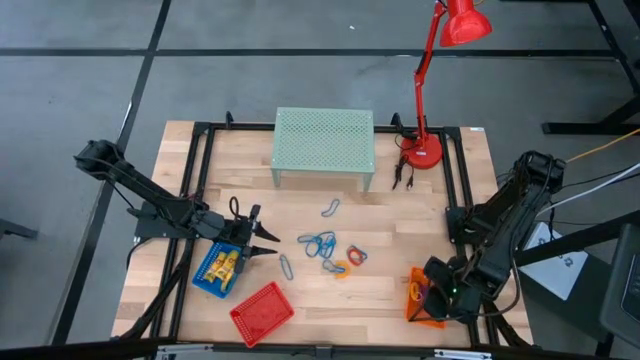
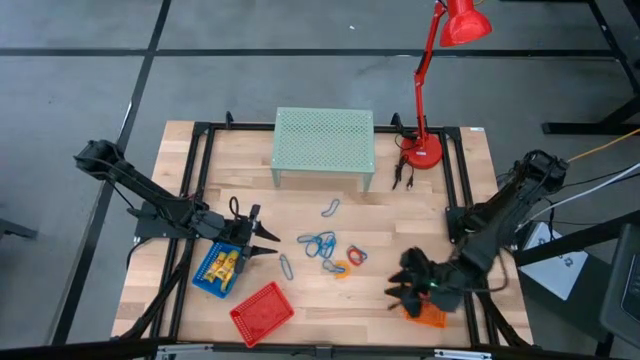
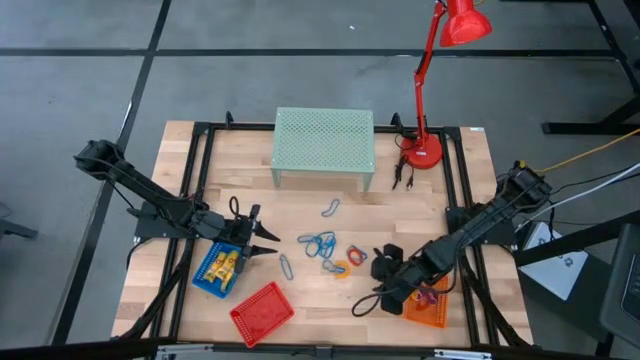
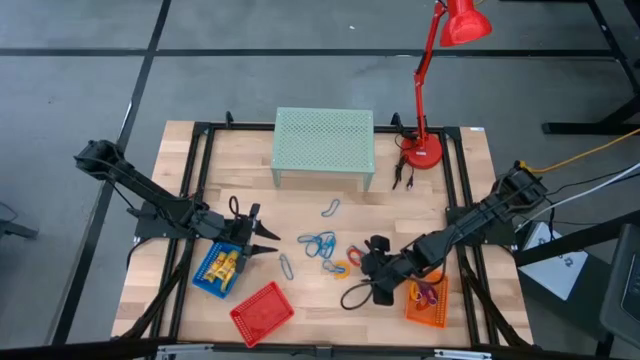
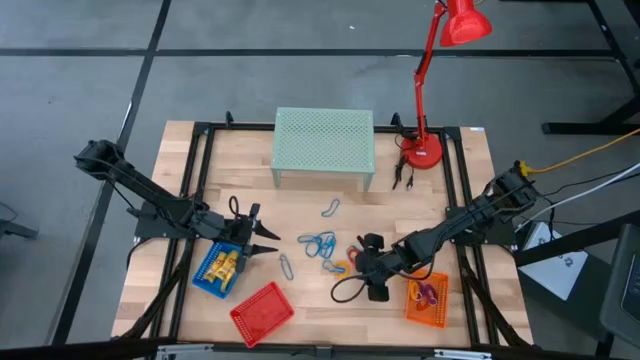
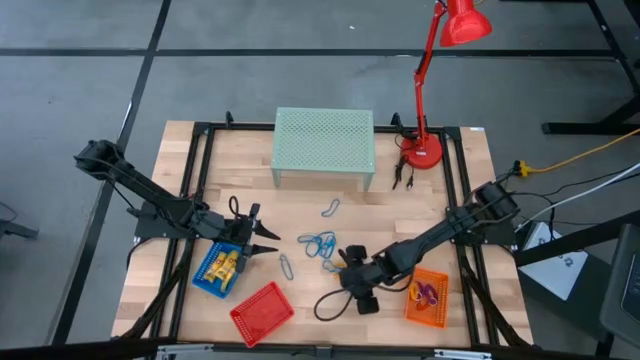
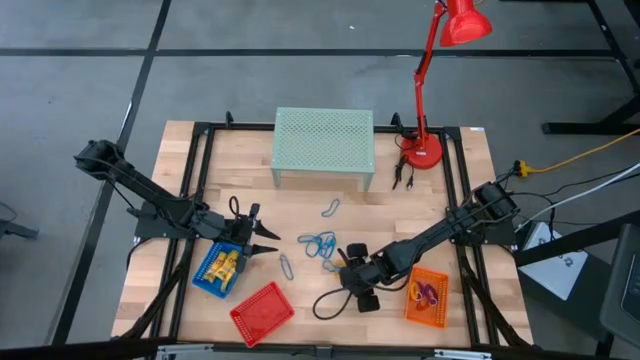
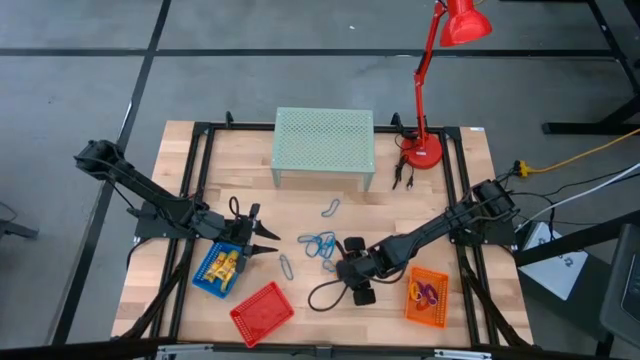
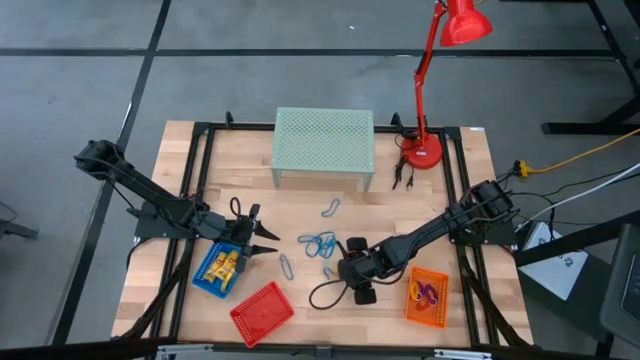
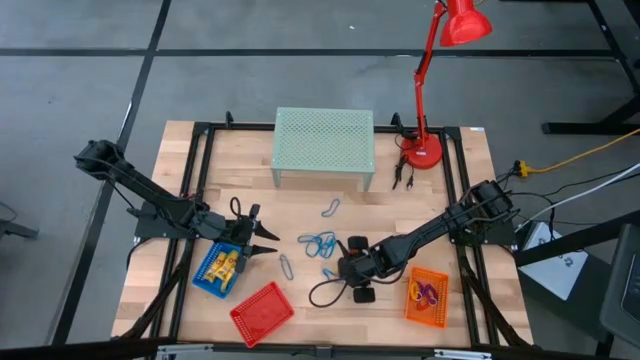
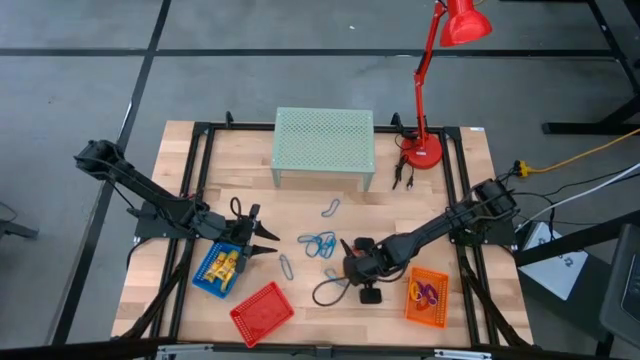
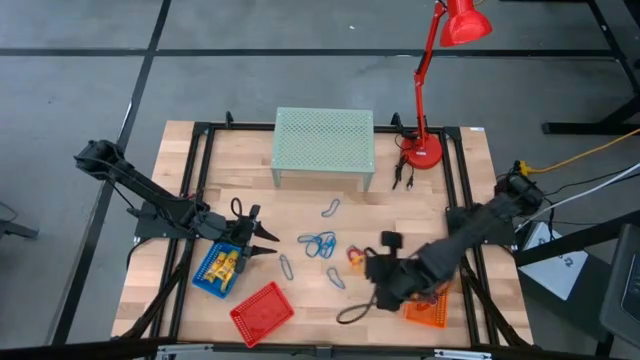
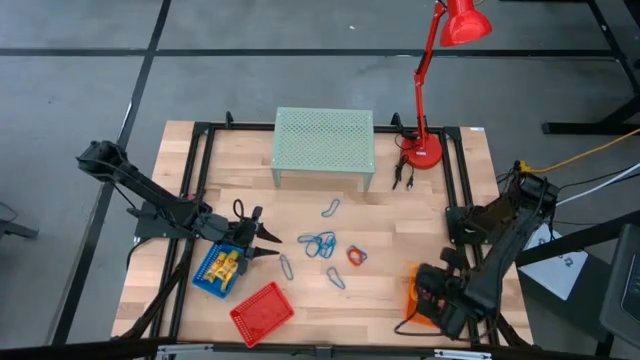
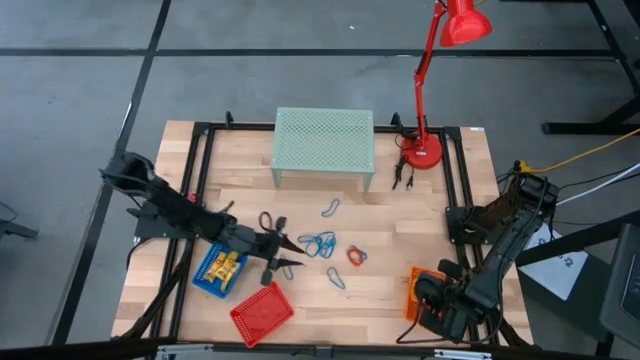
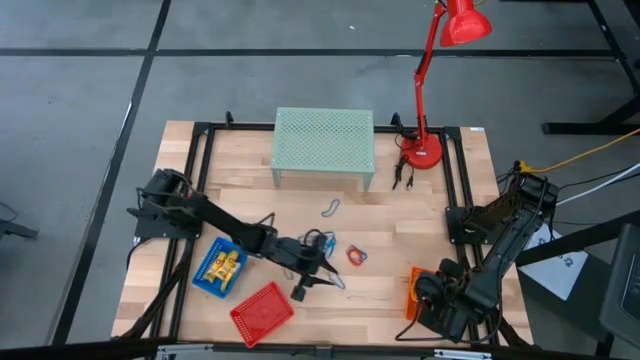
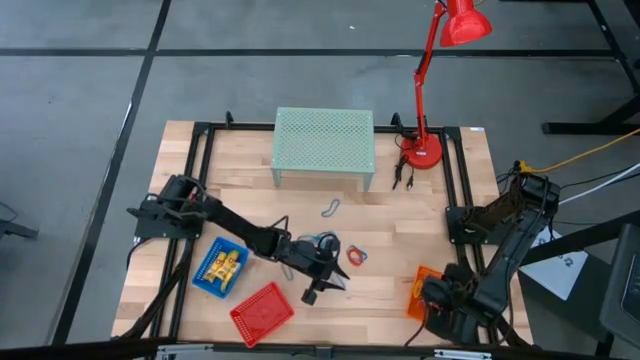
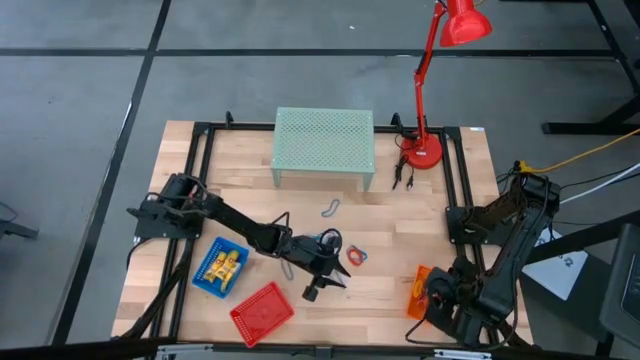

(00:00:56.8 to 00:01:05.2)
Task: Pick & Place Office Desk Supplies
Put the yellow spring keychain into the orange bin

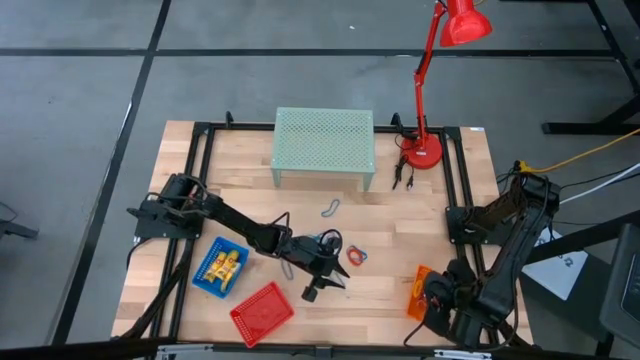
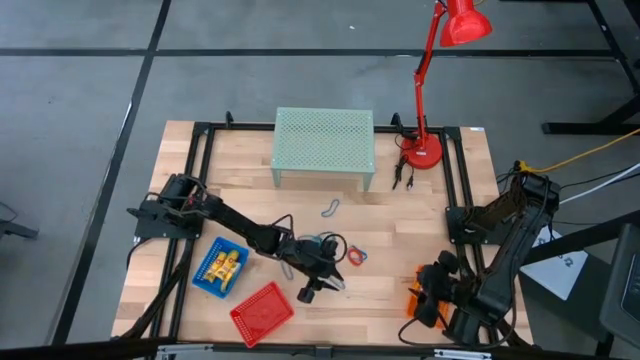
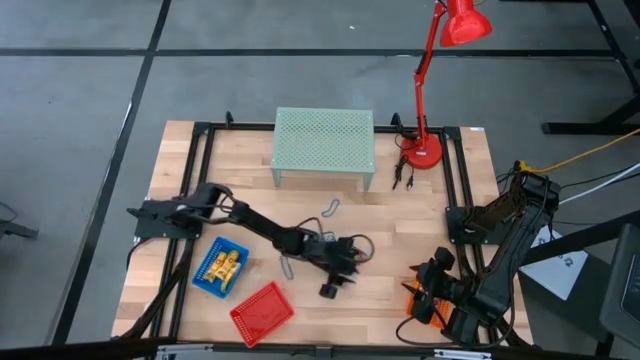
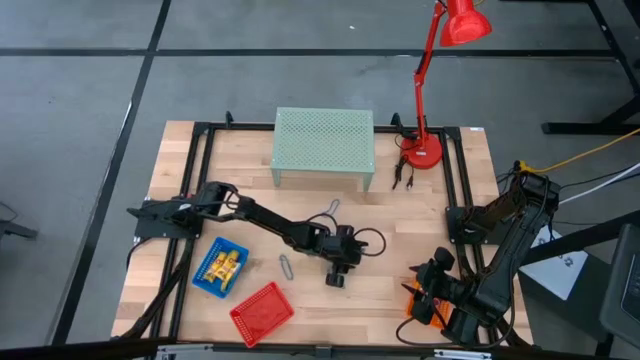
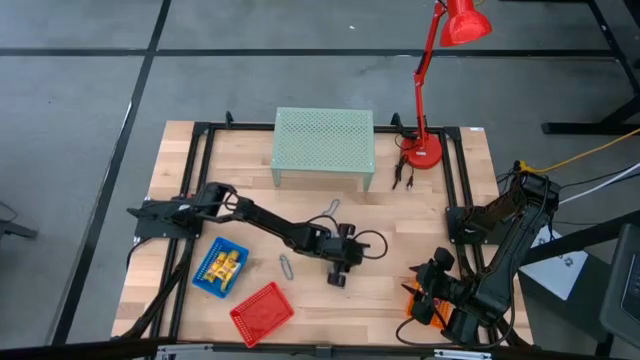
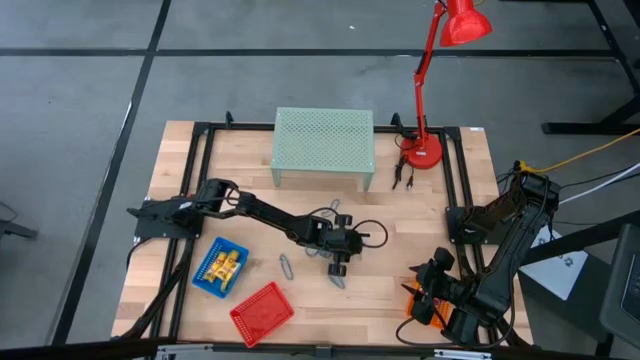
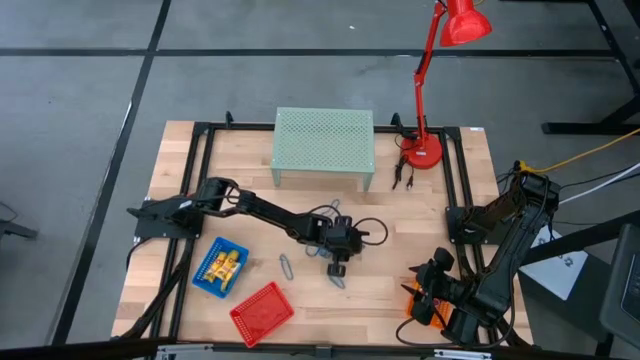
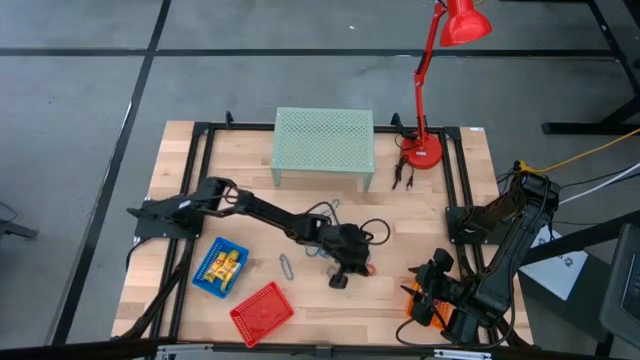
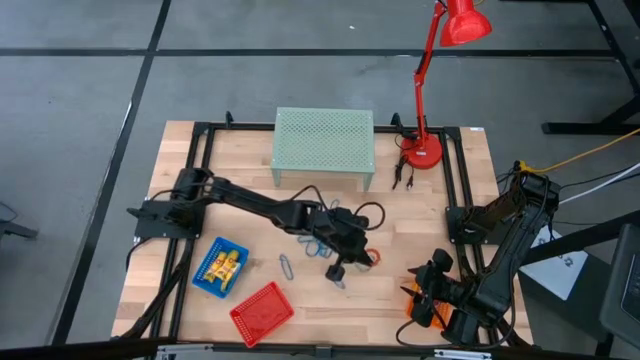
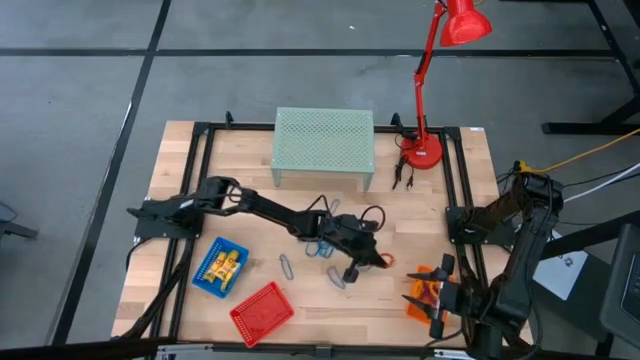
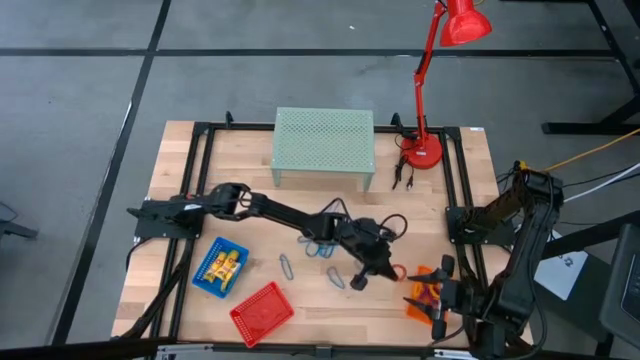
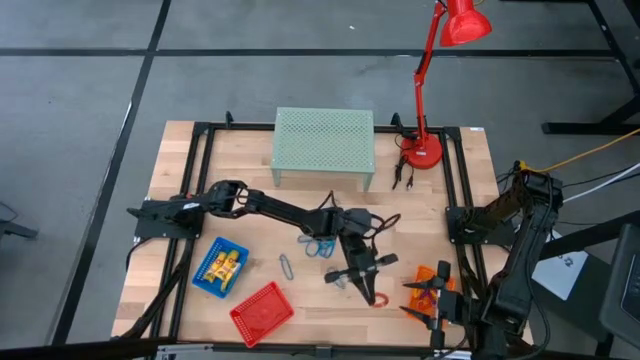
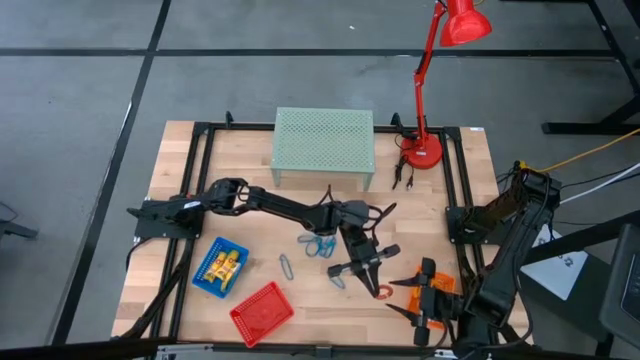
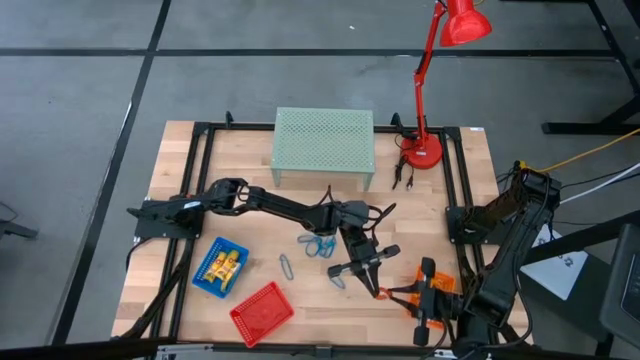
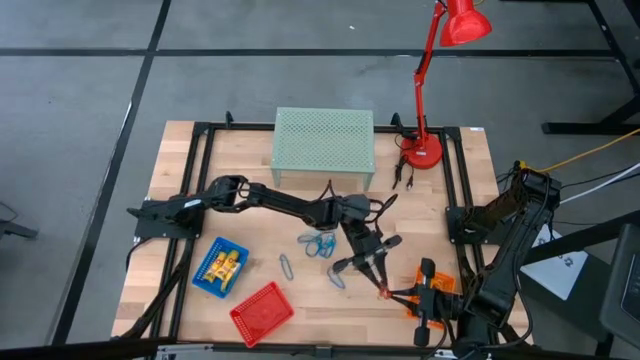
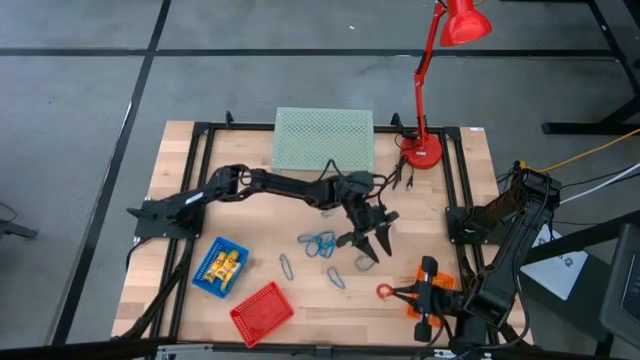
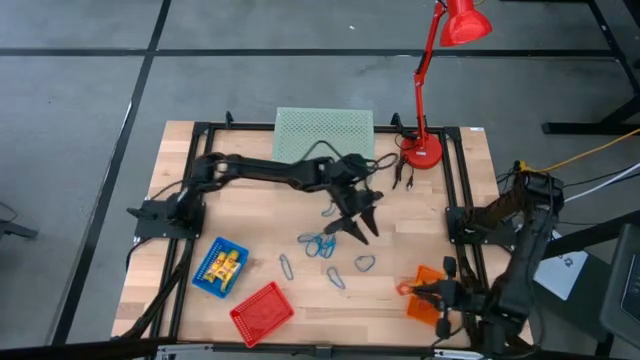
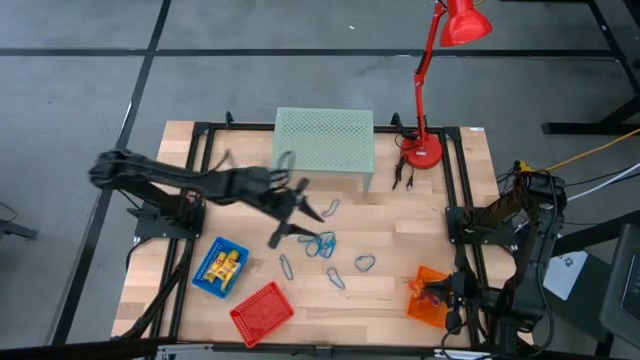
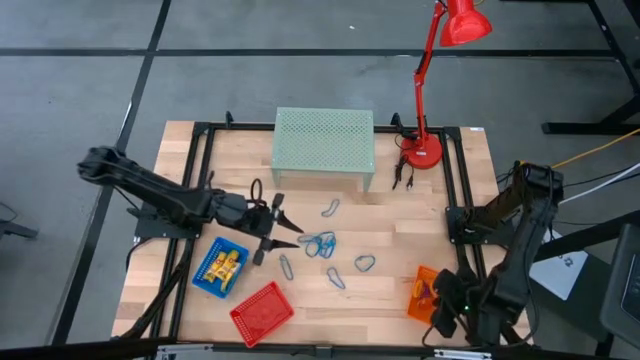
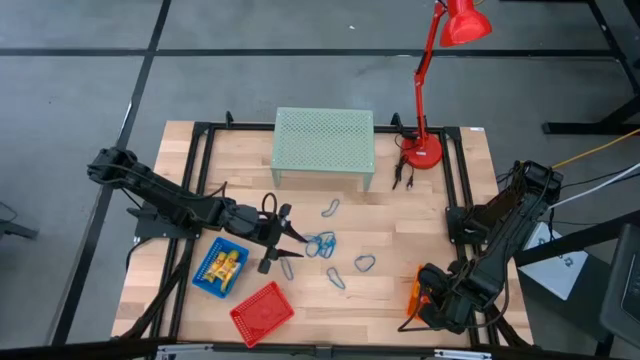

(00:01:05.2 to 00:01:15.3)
Put the orange spring keychain into the orange bin

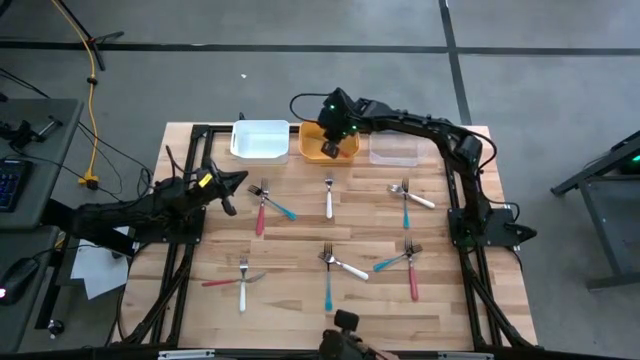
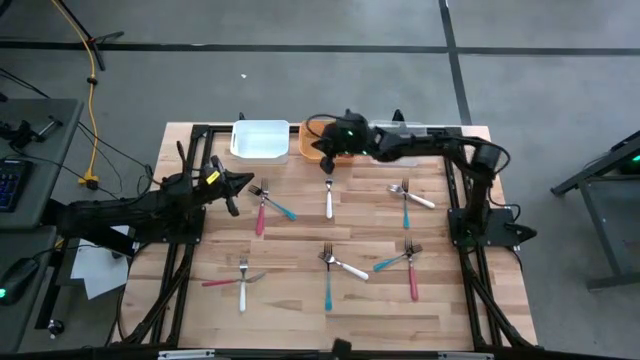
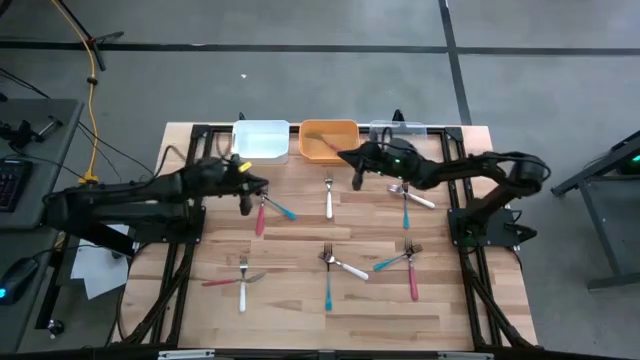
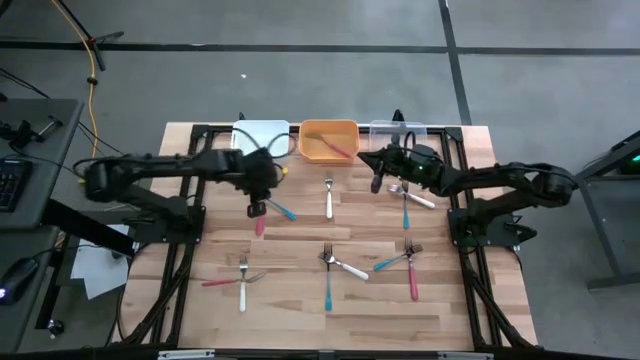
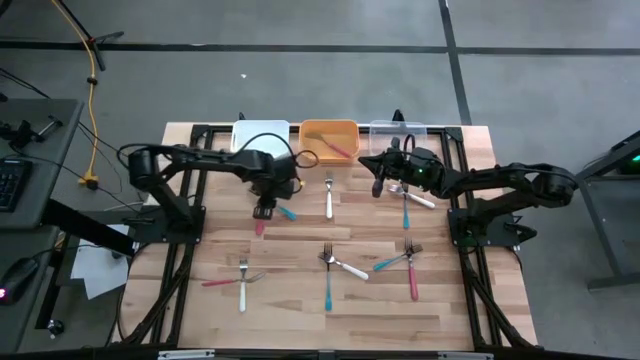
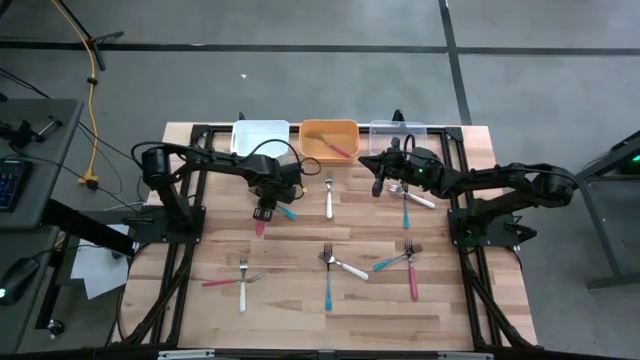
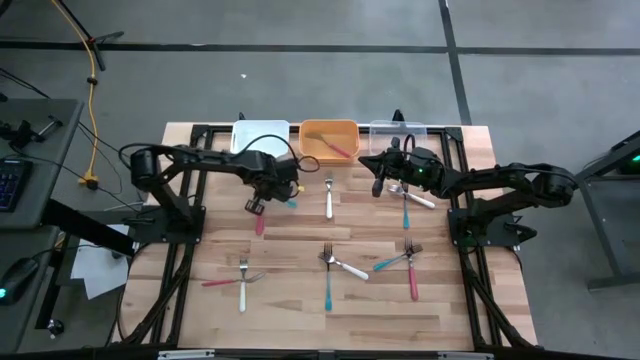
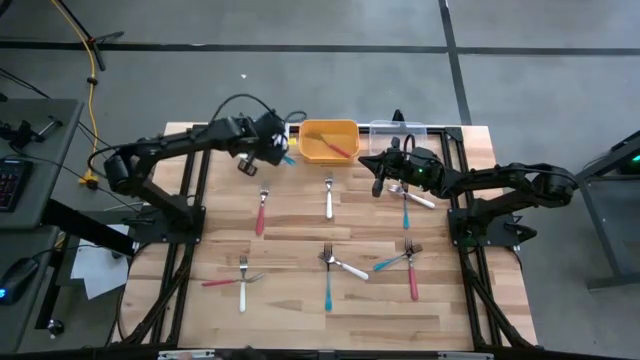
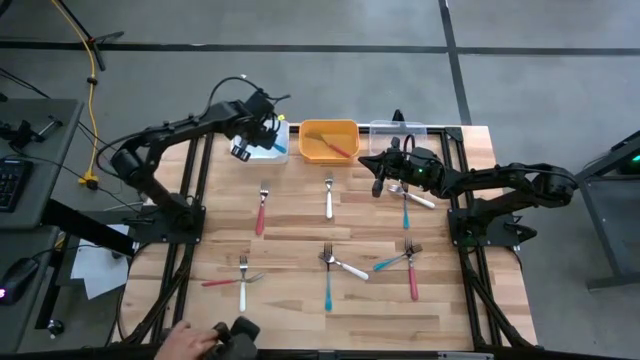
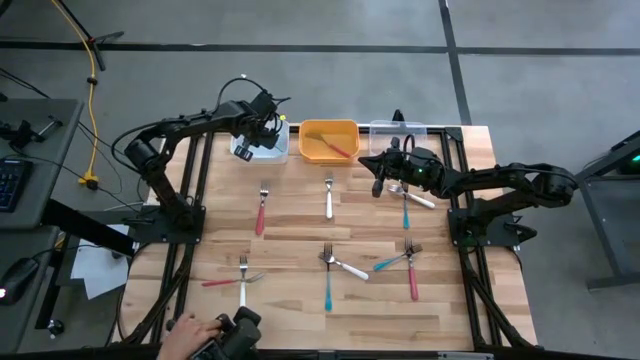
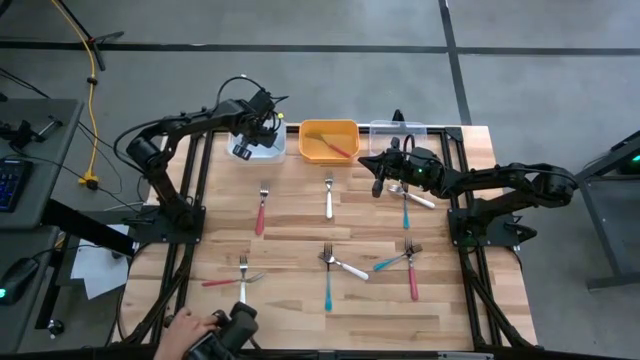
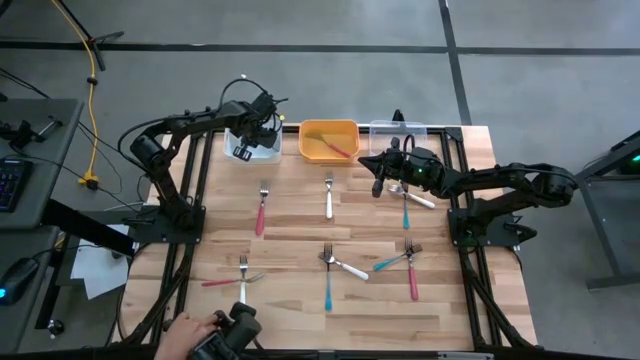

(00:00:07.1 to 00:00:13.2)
Task: Sort silverware by color (type)
Put the top left blue fork into the white bin
